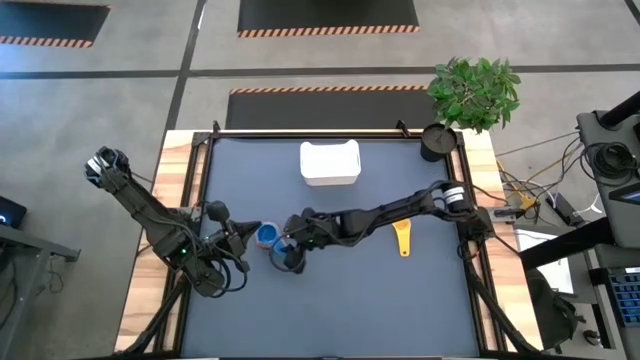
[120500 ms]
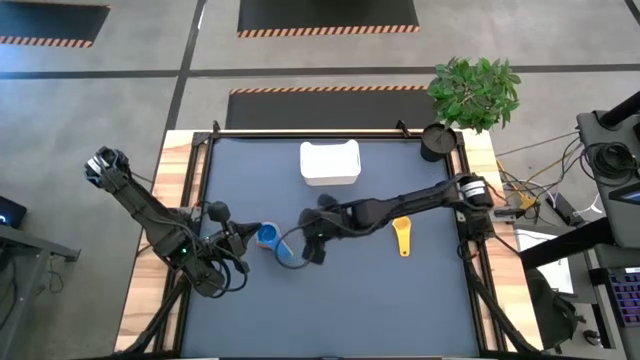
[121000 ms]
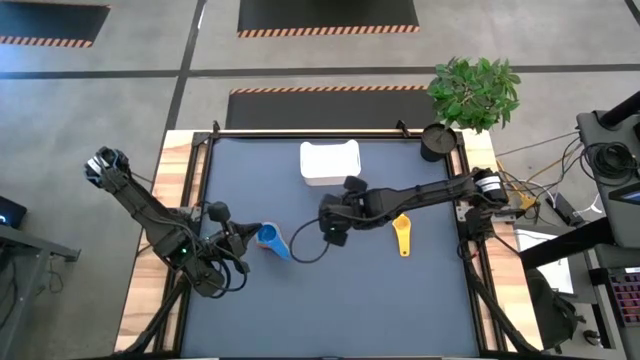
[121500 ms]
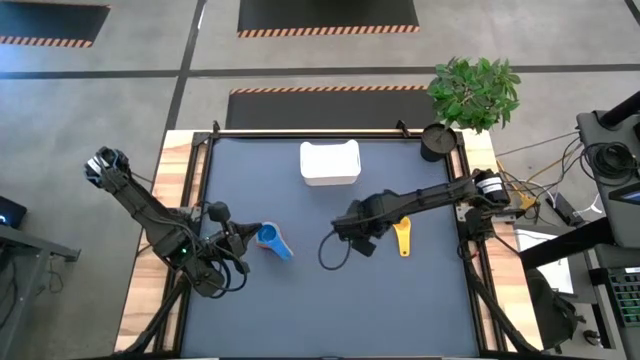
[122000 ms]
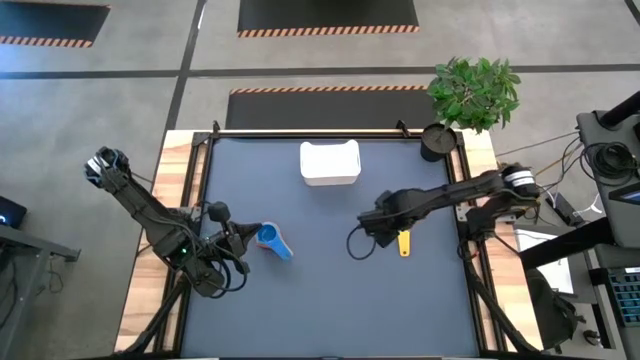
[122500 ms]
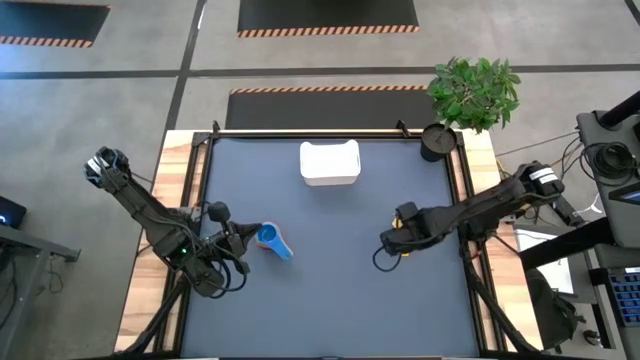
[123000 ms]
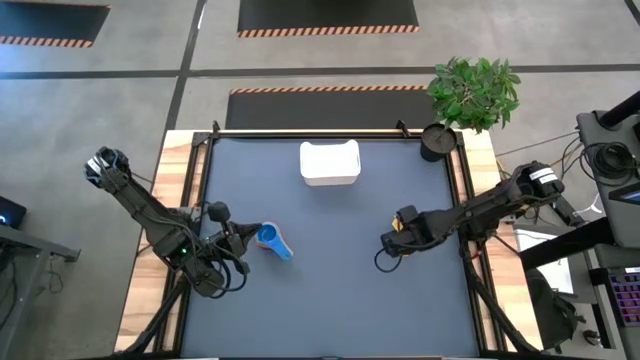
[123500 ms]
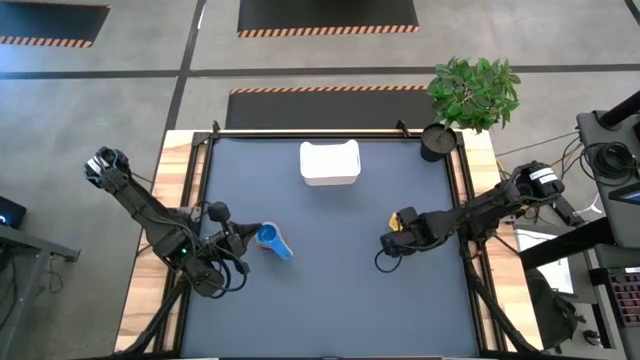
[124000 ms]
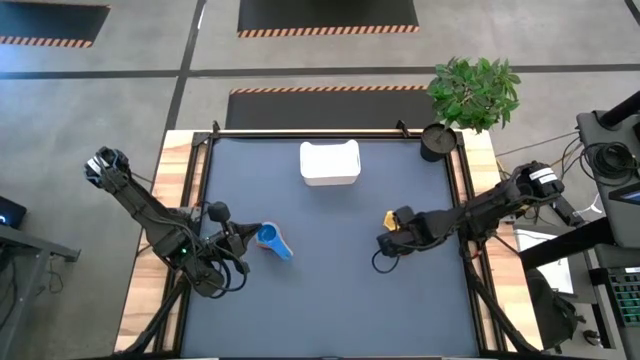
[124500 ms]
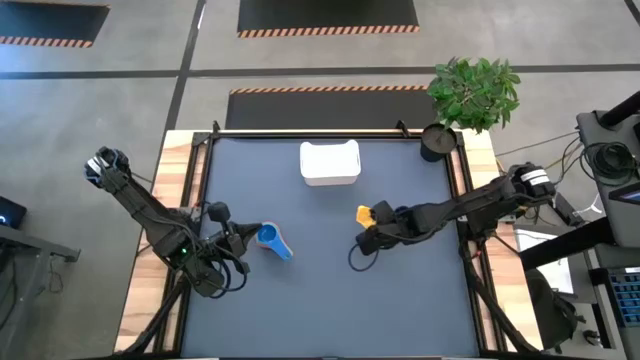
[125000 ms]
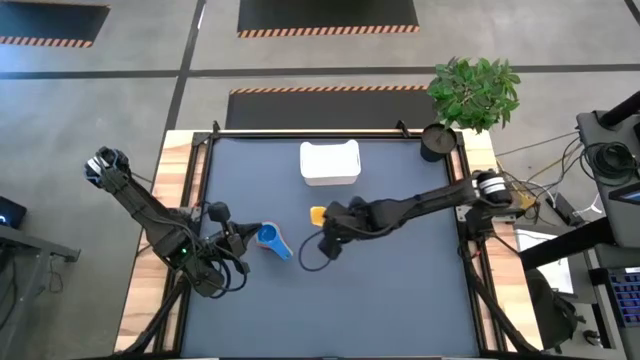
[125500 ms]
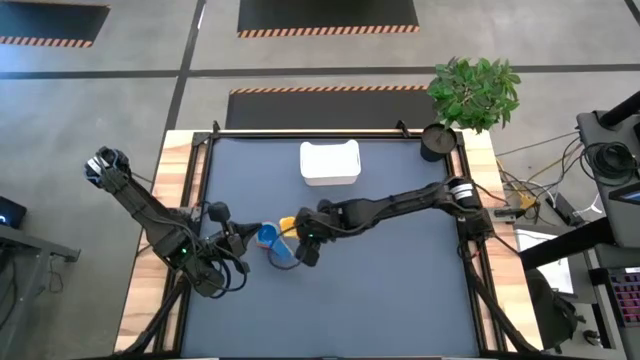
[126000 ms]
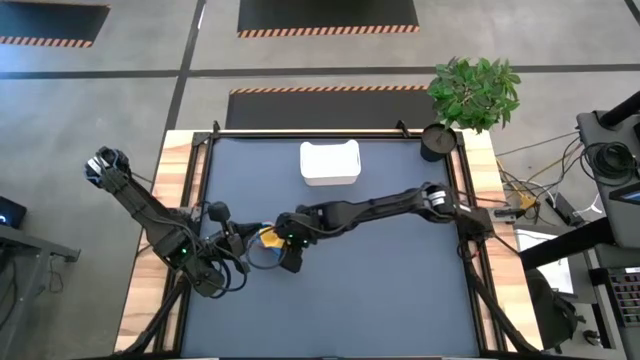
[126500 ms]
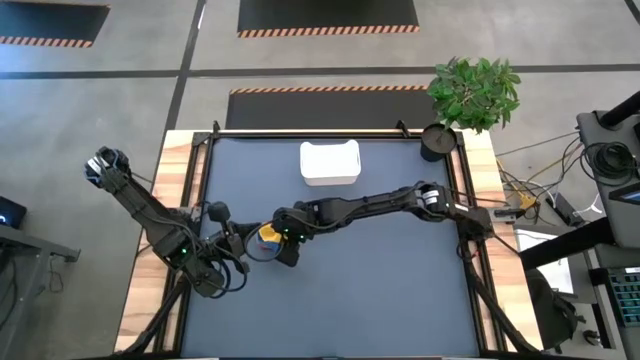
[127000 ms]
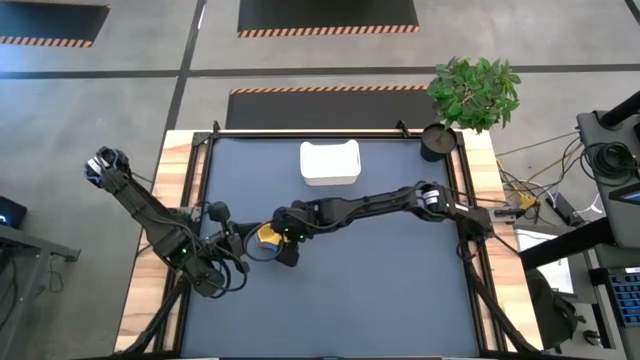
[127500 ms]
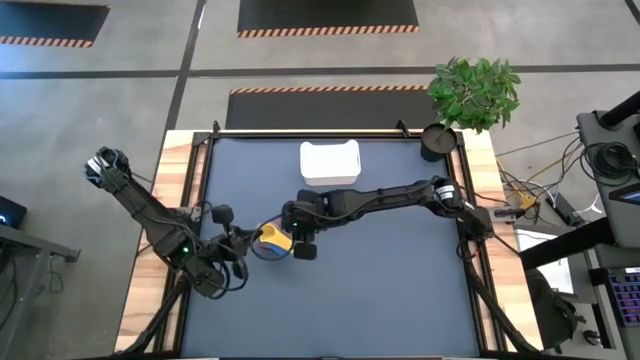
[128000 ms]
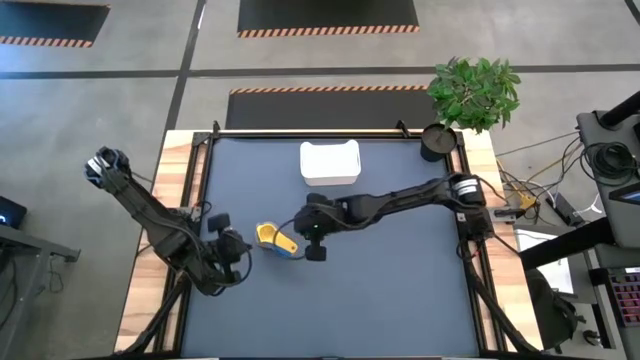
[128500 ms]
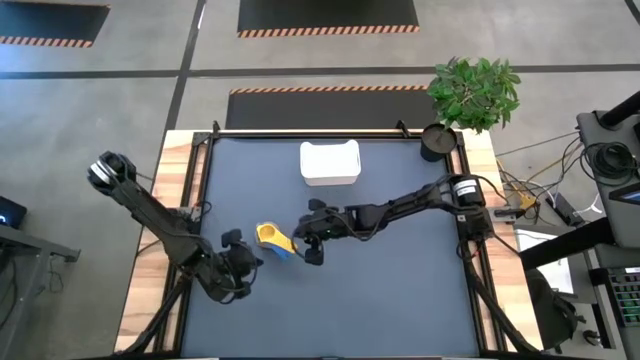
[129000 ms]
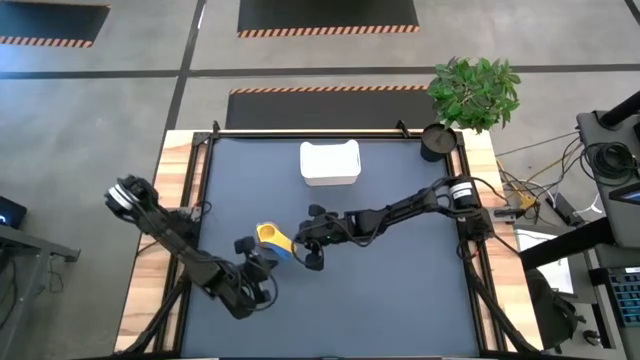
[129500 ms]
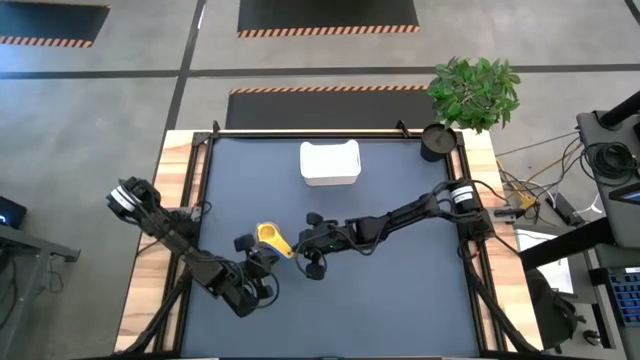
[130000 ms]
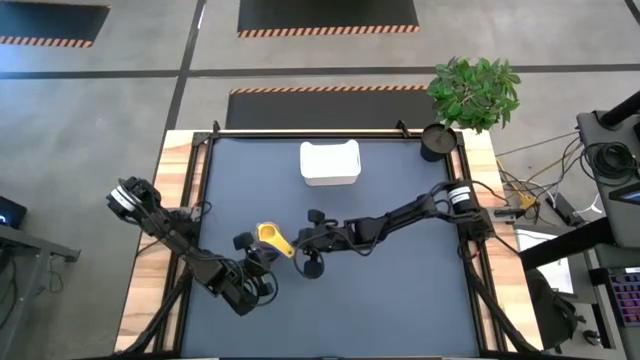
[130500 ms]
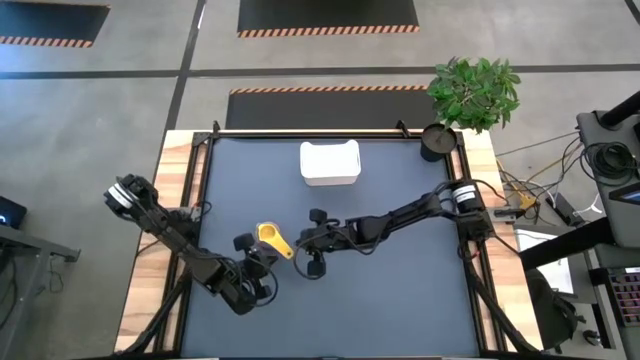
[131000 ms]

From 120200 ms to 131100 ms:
Task: Nest measuring cups in basket
Stack the yellow measuring cup on top of the blue measuring cup

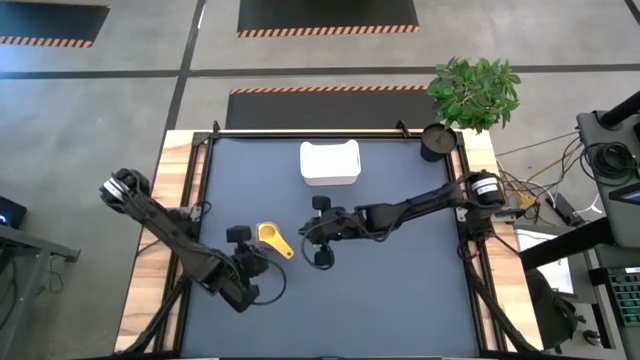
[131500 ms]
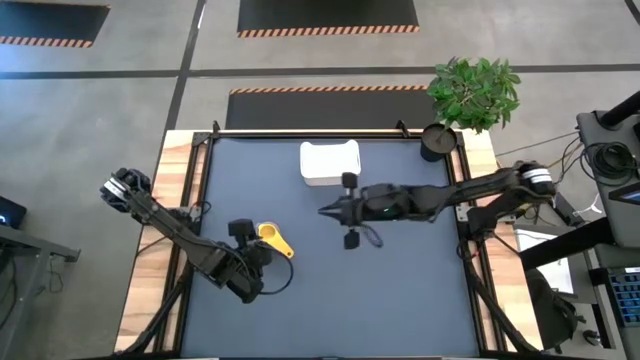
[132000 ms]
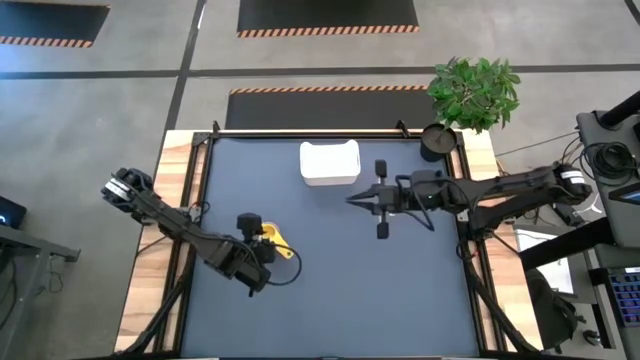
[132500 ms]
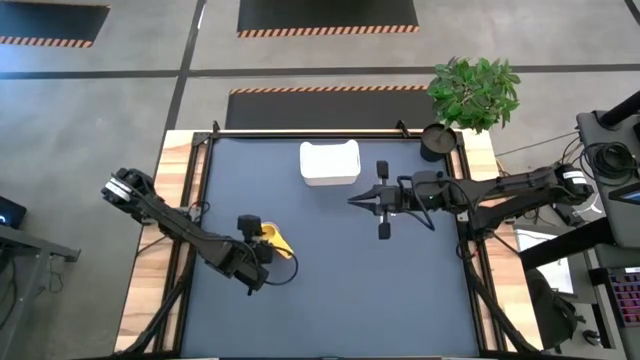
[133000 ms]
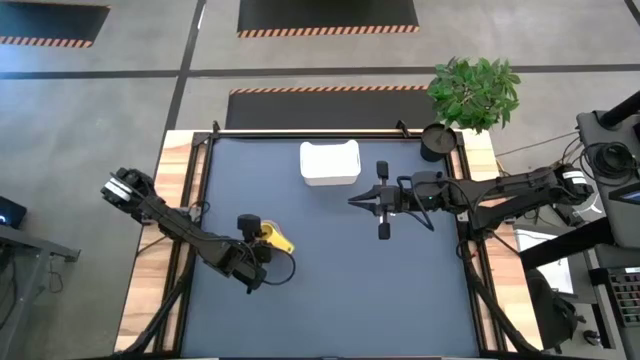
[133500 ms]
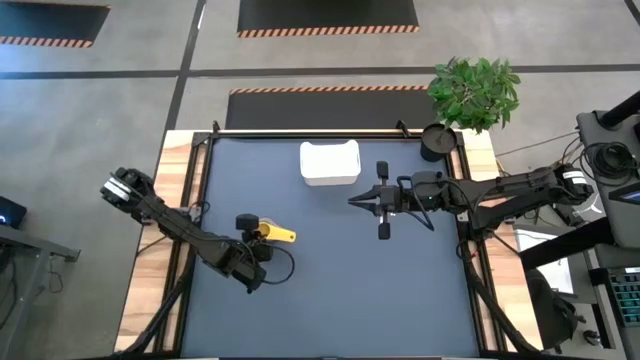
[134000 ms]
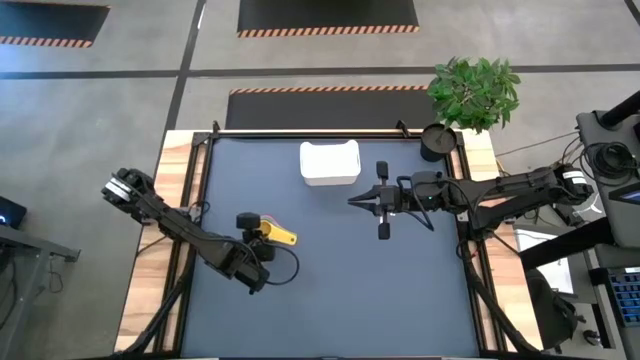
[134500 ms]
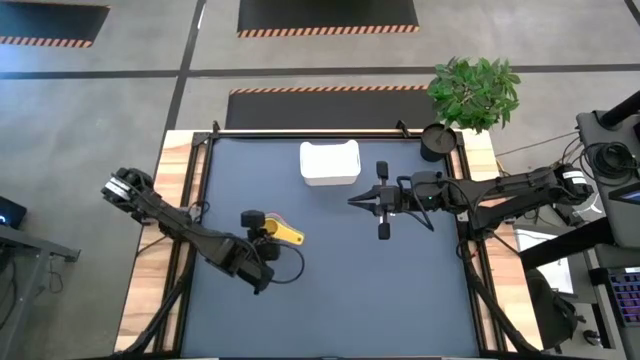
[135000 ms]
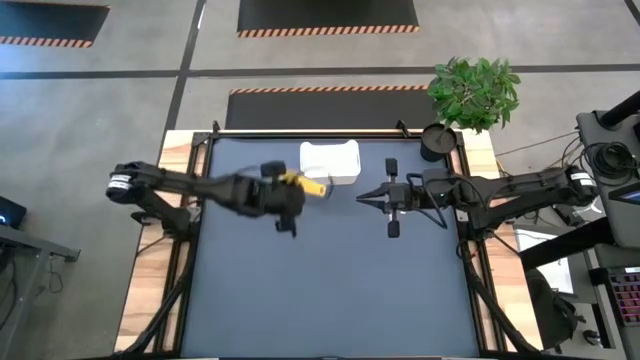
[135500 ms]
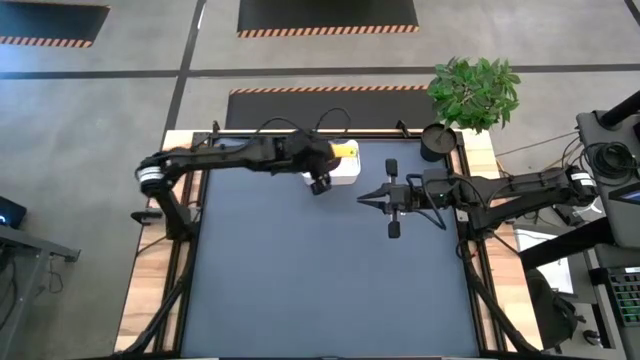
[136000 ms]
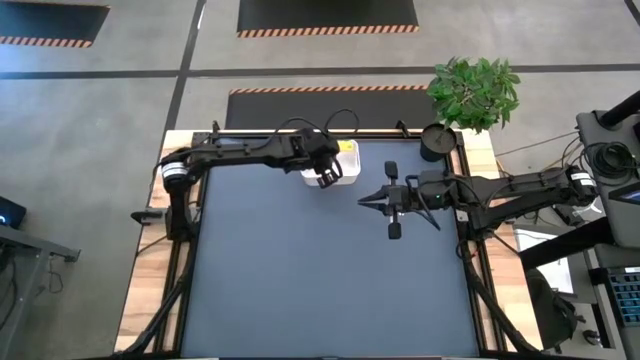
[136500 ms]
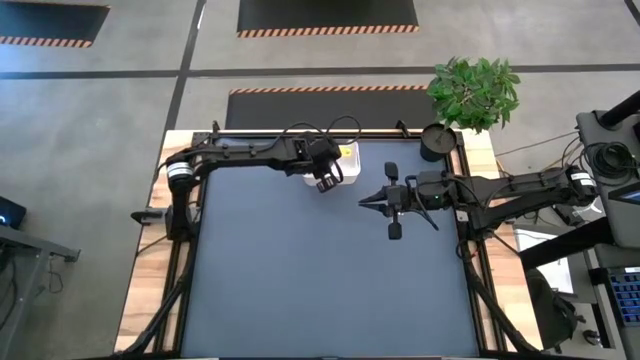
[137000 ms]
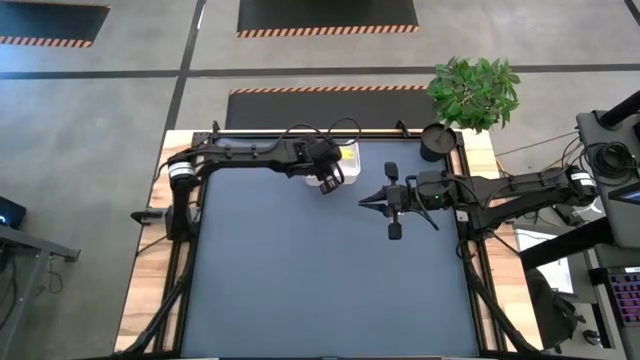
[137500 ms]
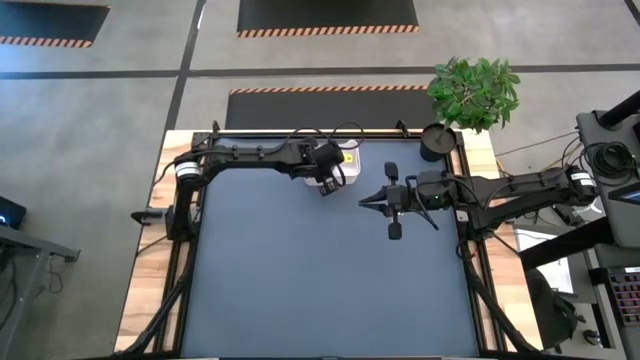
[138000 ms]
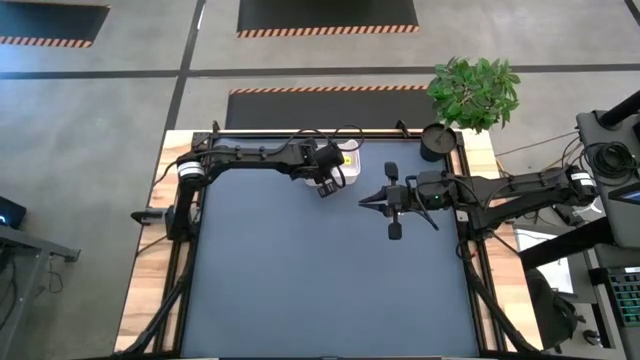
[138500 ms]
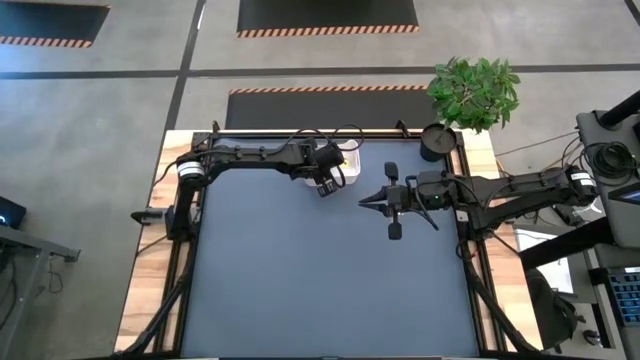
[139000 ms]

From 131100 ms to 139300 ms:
Put the stacked colored measuring cups into the white bin

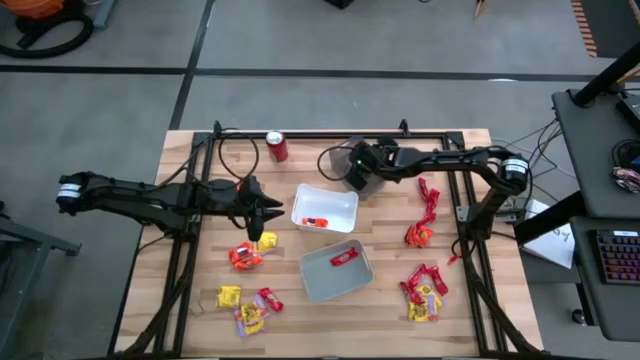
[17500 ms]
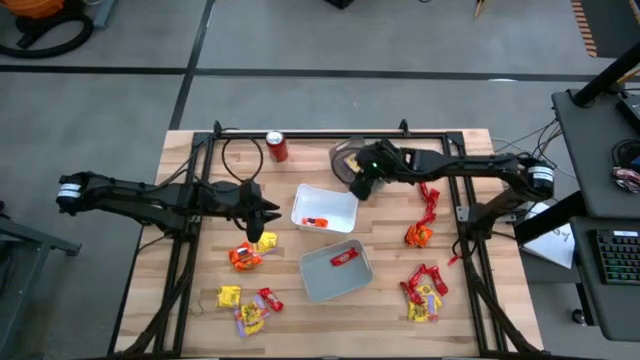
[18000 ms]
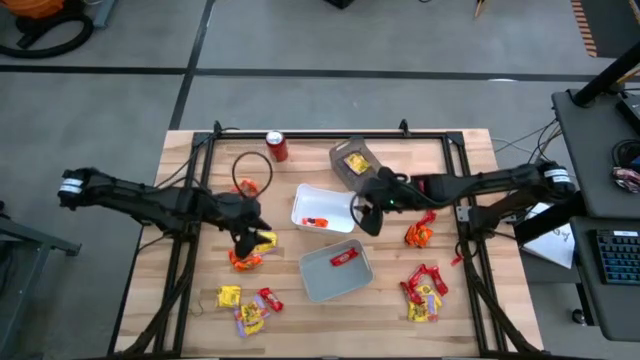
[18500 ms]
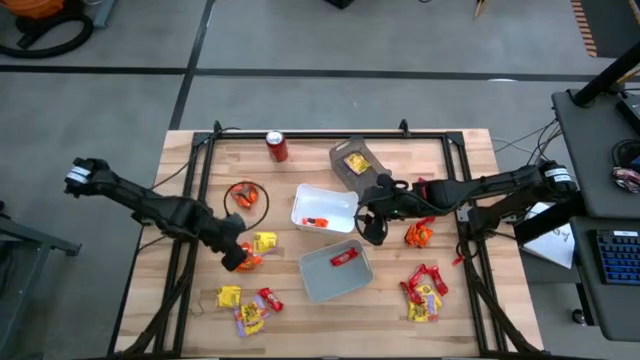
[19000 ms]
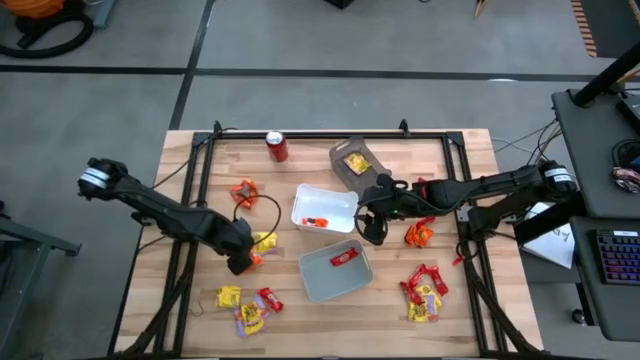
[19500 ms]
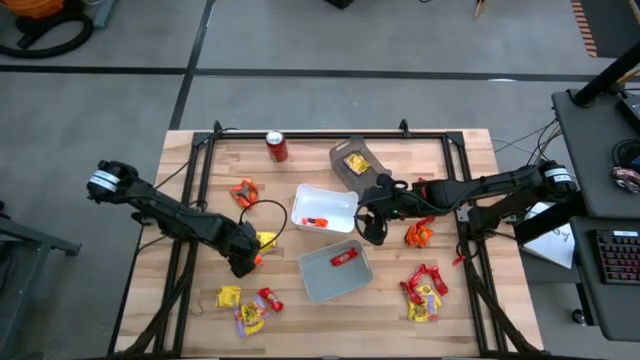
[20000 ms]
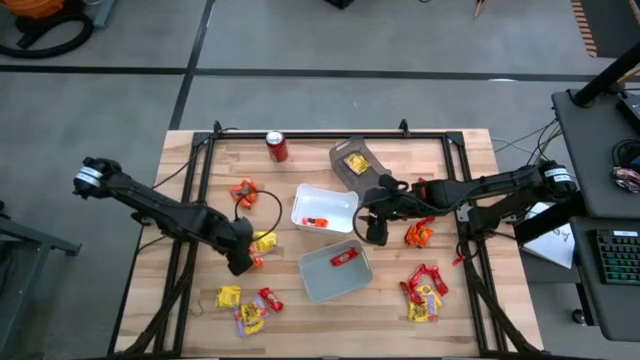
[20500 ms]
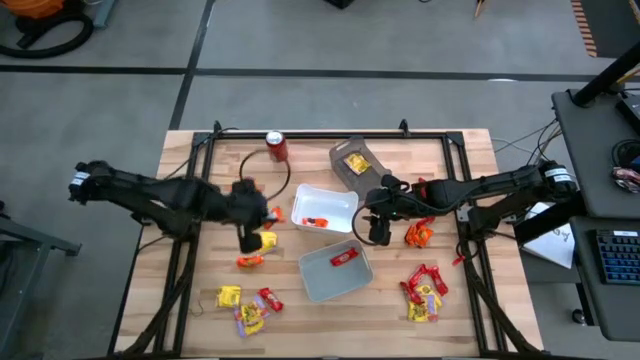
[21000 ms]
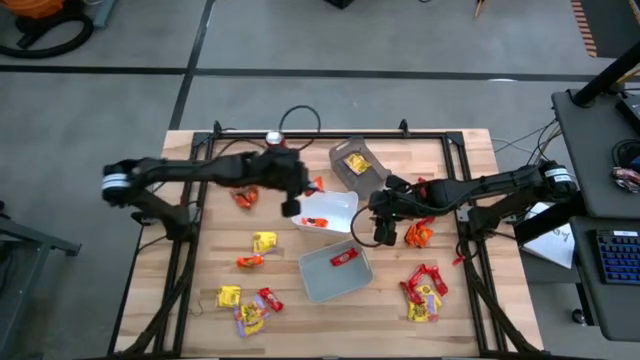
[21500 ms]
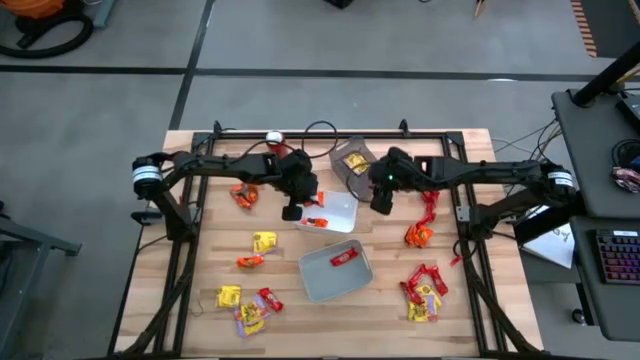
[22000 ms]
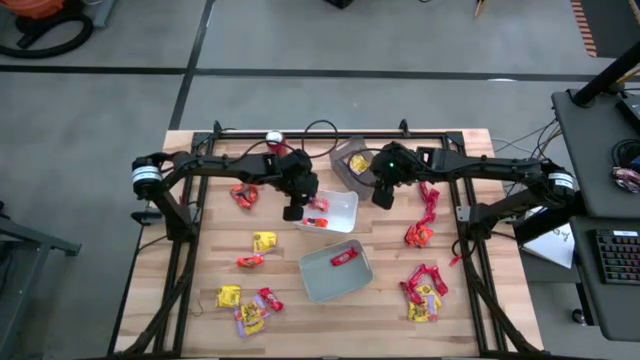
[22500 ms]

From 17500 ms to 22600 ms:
Task: Sort candy
Put the orange chocolate pack into the white bin
